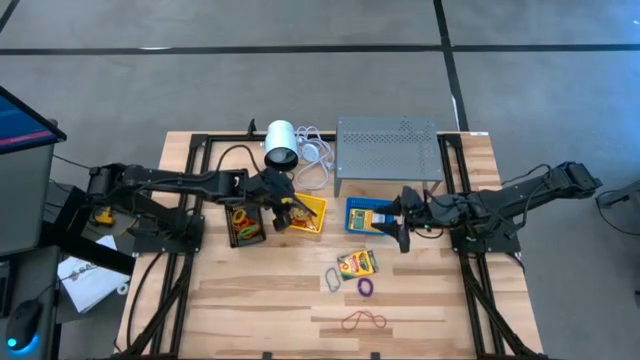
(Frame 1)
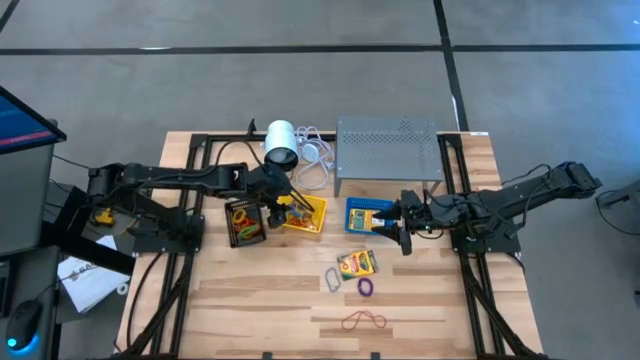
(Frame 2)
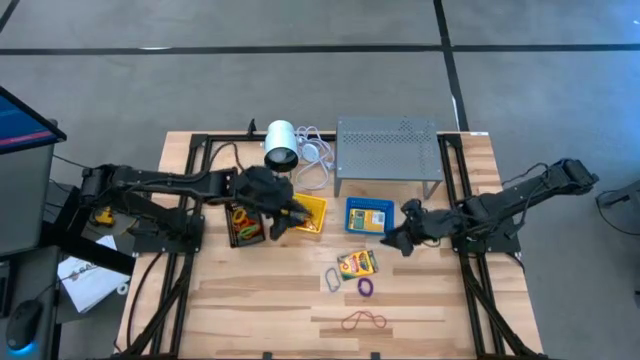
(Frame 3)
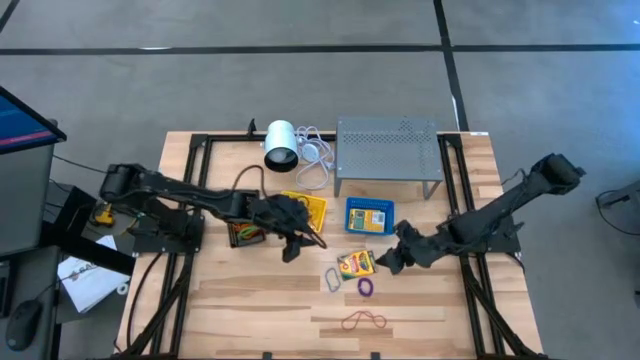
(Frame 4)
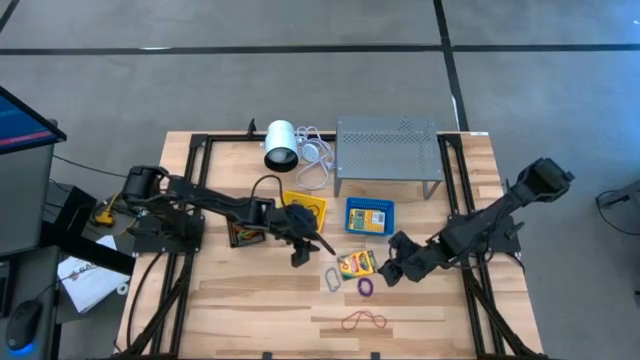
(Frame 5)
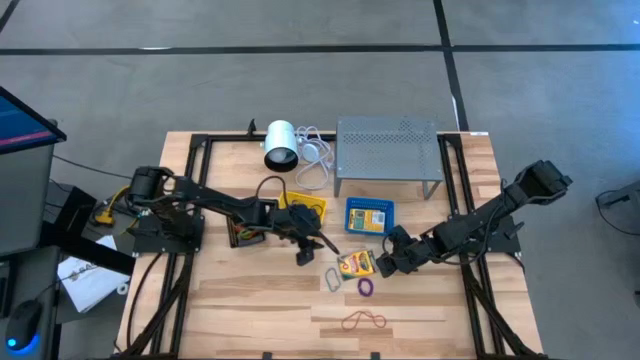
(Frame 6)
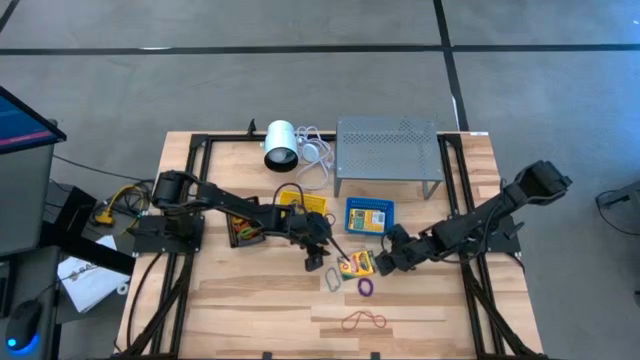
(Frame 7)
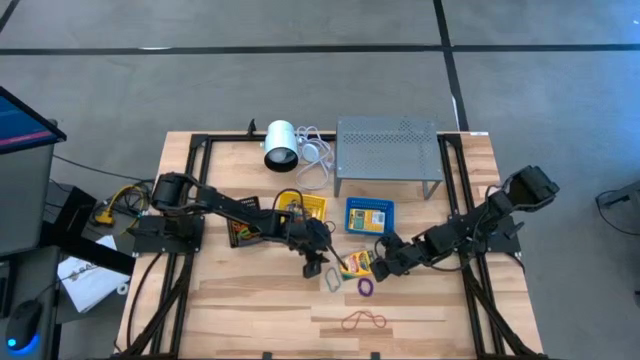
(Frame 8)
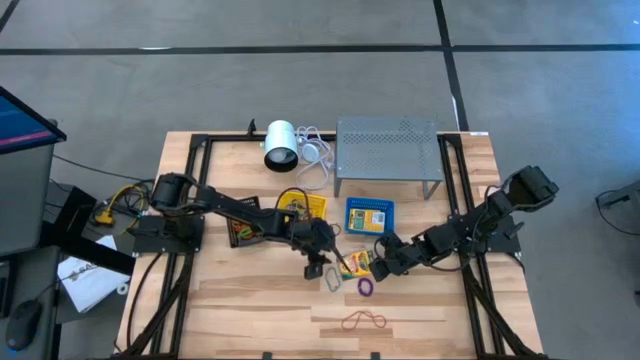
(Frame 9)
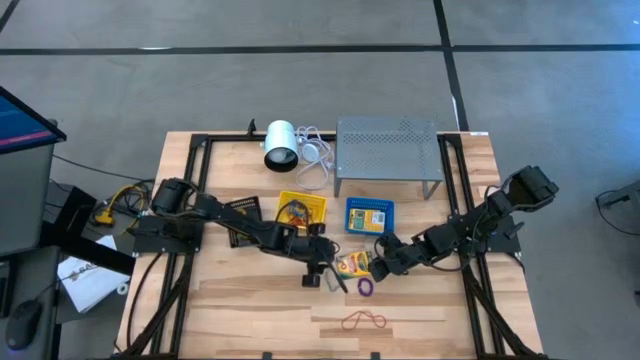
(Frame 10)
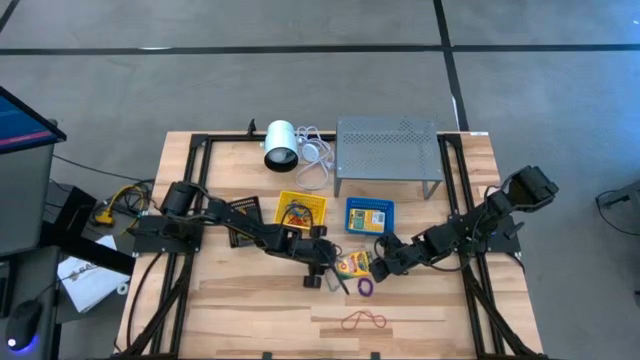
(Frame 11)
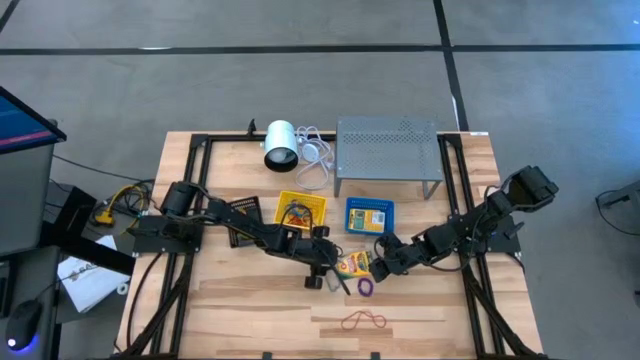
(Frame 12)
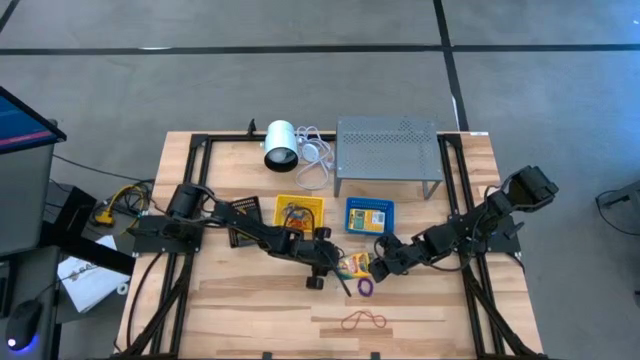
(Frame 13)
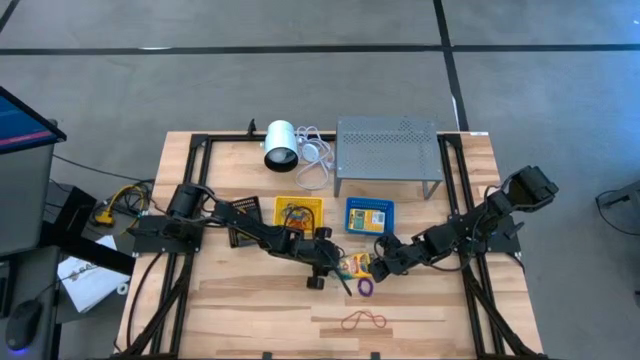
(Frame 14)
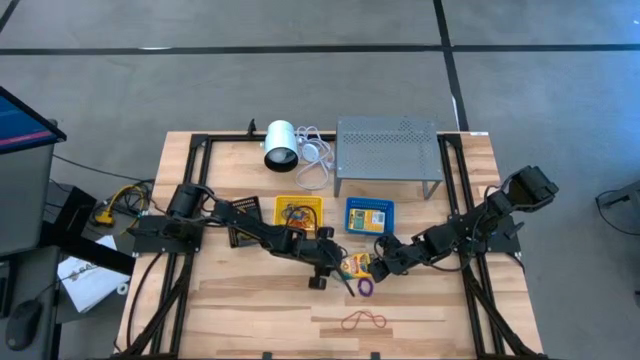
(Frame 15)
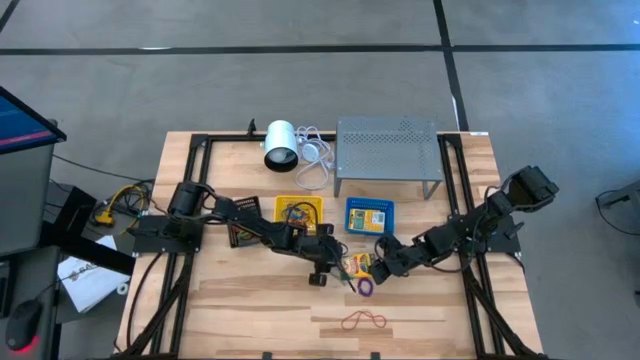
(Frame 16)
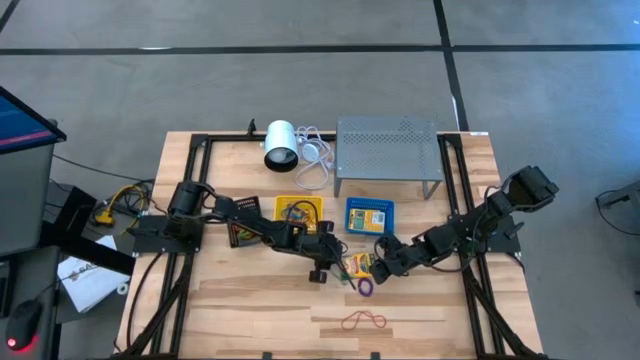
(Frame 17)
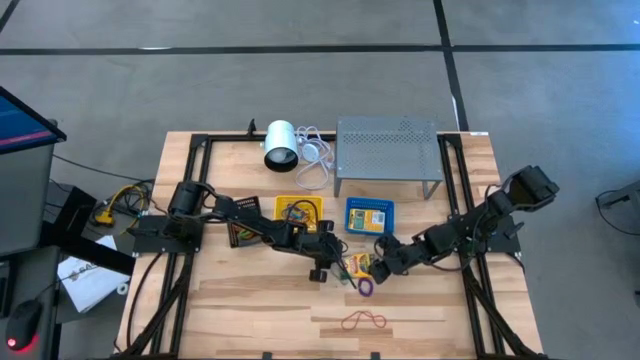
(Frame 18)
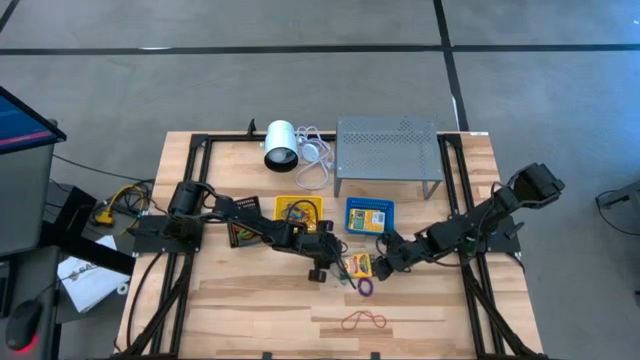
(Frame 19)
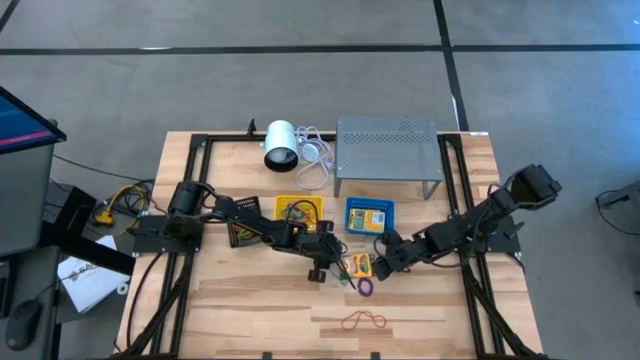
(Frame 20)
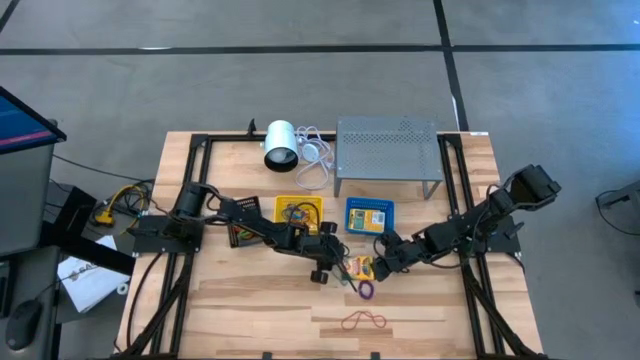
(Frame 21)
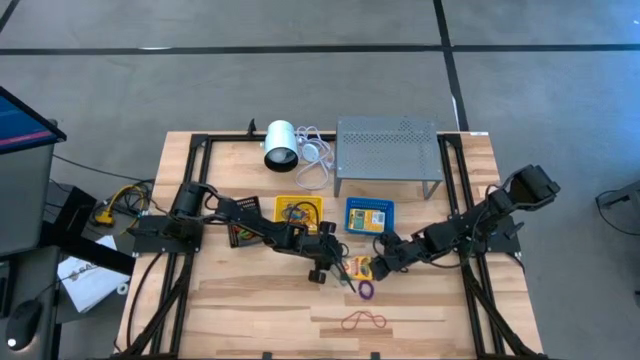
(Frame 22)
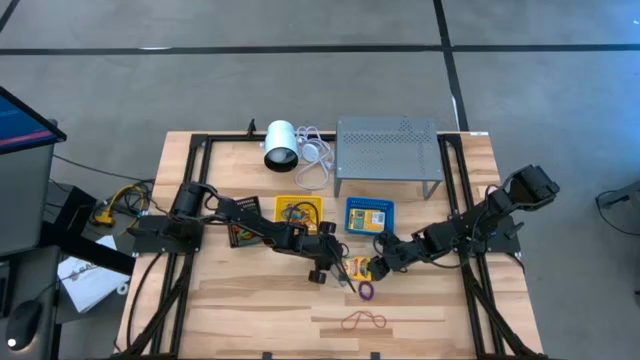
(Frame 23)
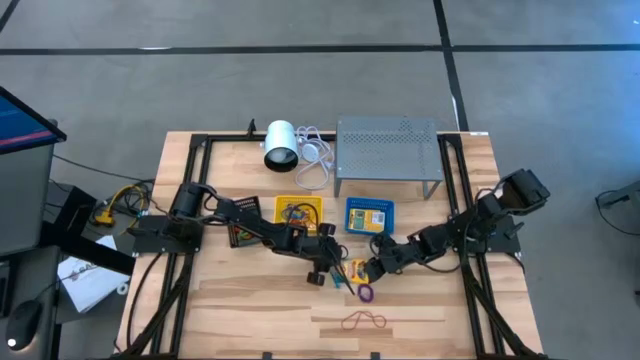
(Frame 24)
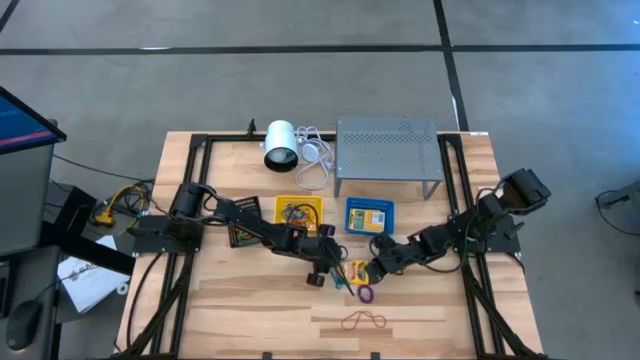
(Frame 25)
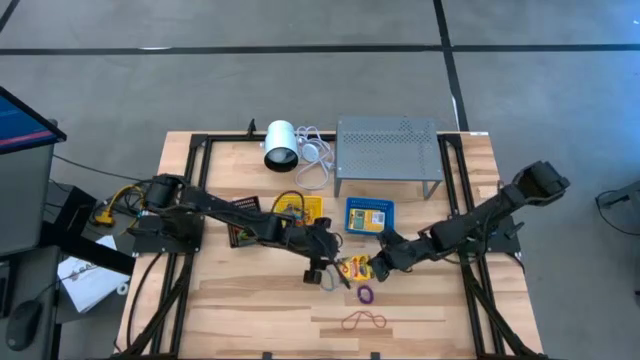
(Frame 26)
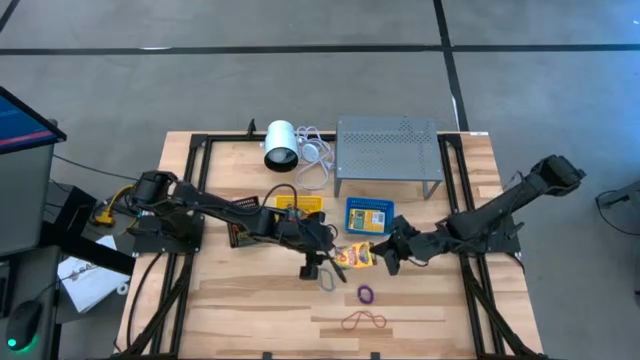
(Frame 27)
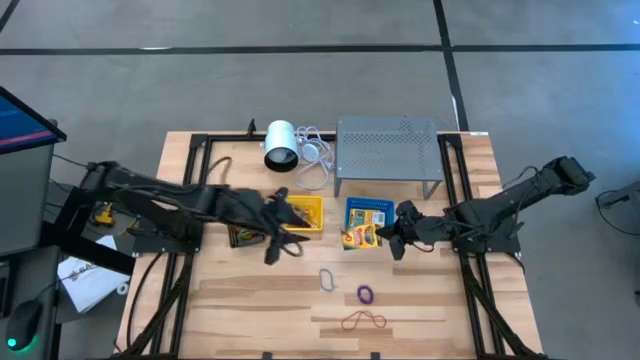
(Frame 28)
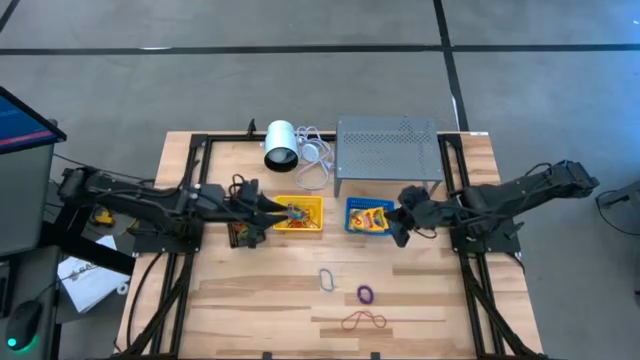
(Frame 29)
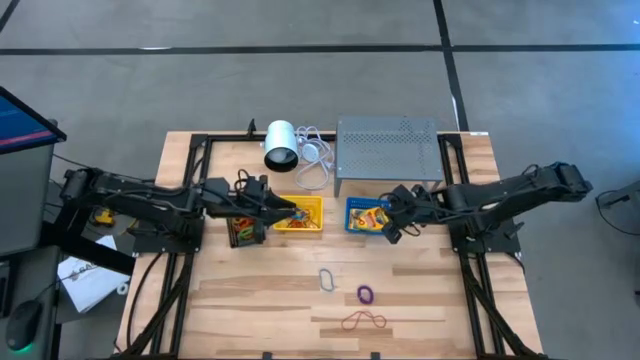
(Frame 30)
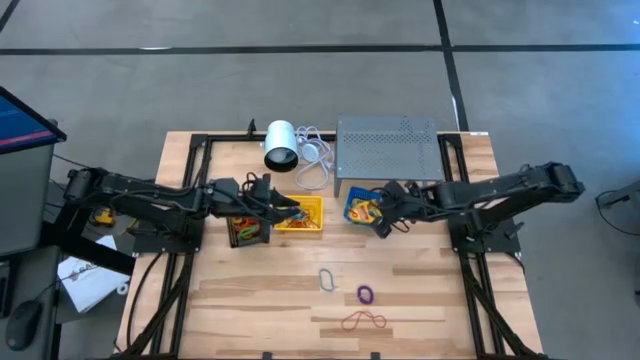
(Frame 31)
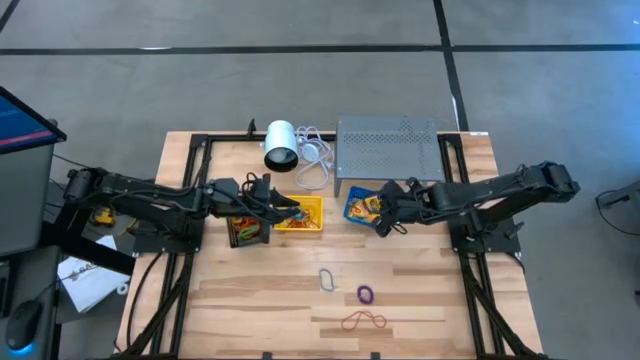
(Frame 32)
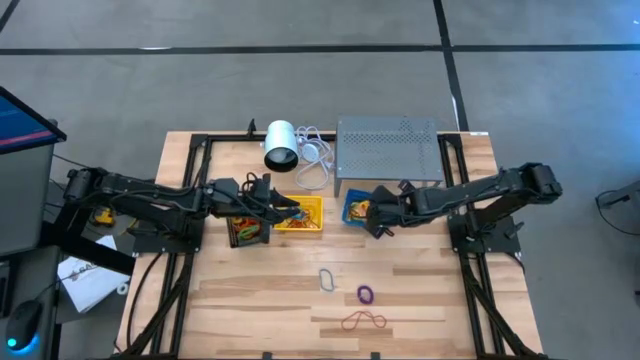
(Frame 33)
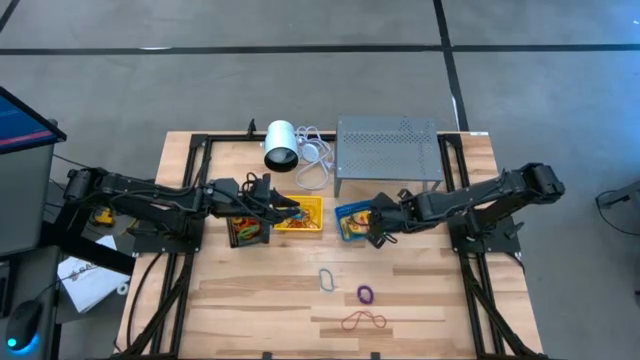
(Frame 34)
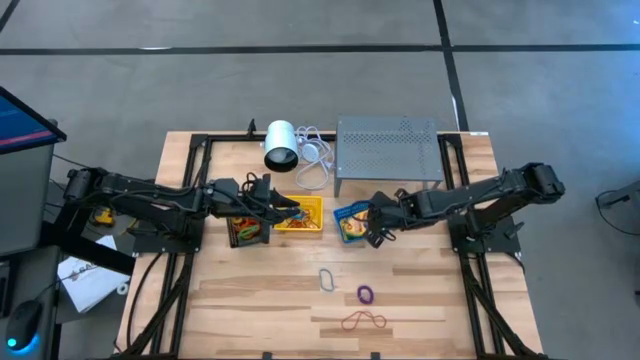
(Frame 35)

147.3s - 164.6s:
Task: Pick & Place Office Desk Supplies
Put the crayon box into the blue bin

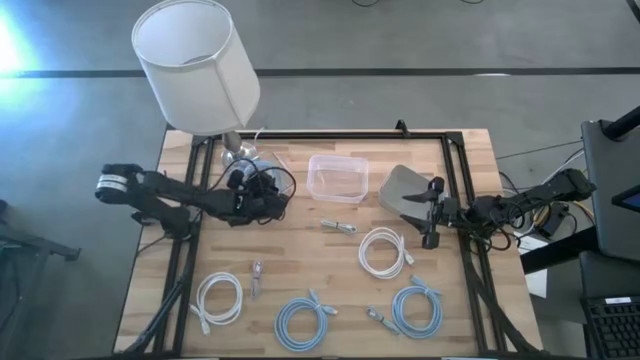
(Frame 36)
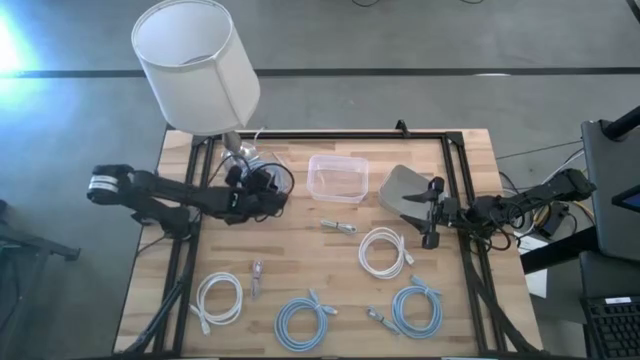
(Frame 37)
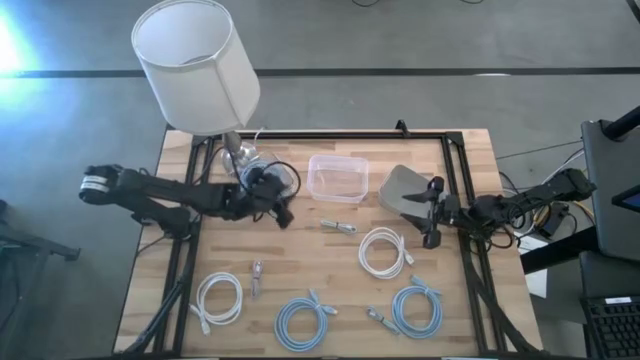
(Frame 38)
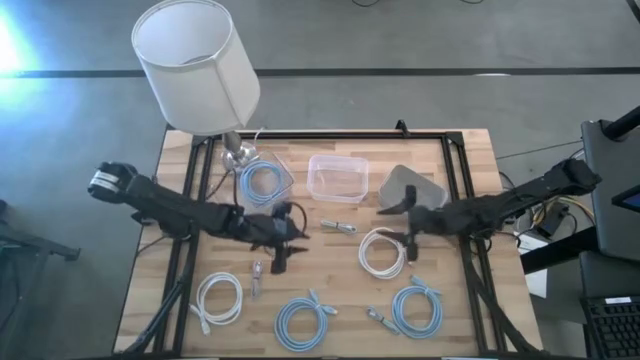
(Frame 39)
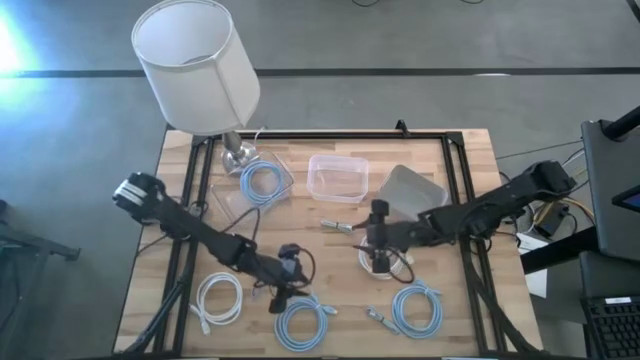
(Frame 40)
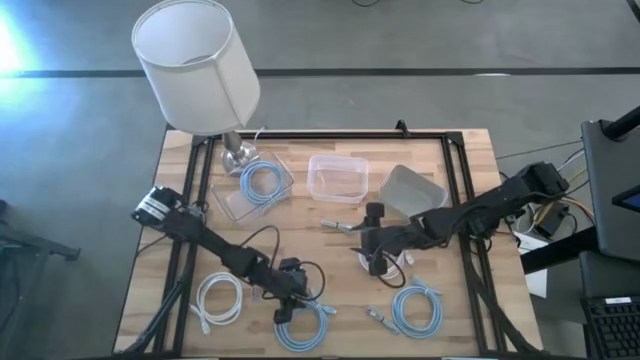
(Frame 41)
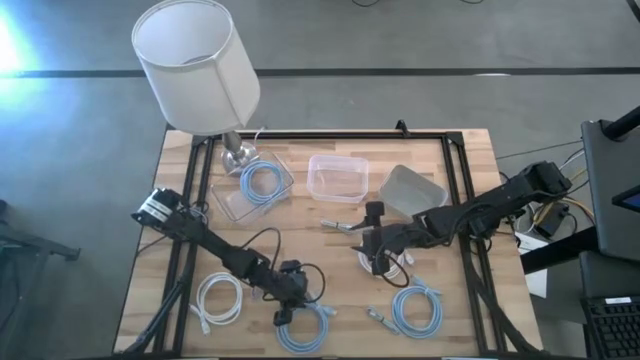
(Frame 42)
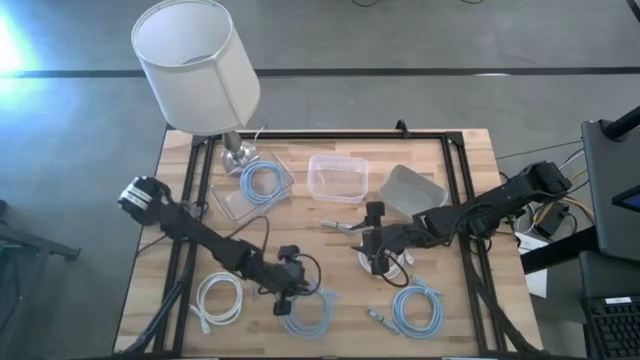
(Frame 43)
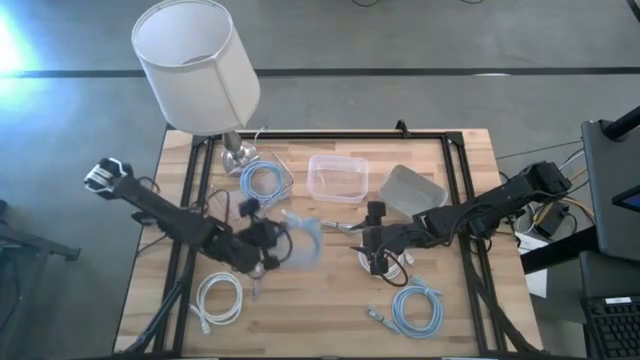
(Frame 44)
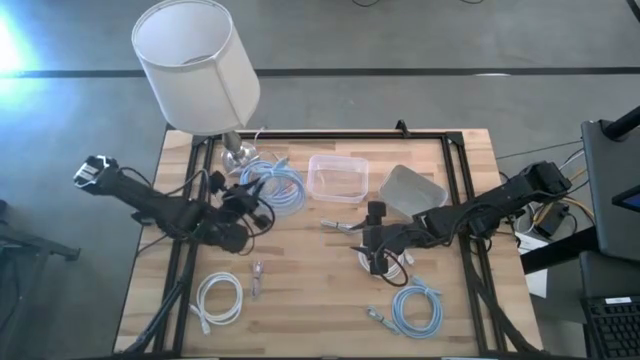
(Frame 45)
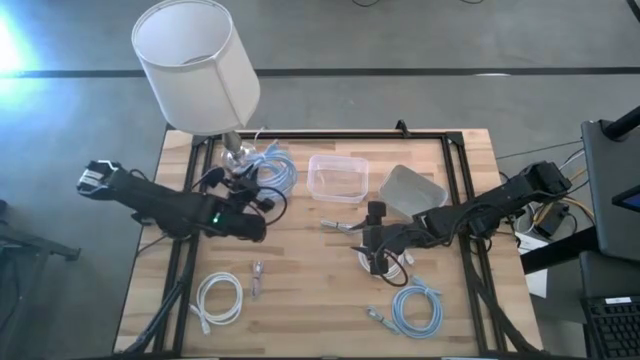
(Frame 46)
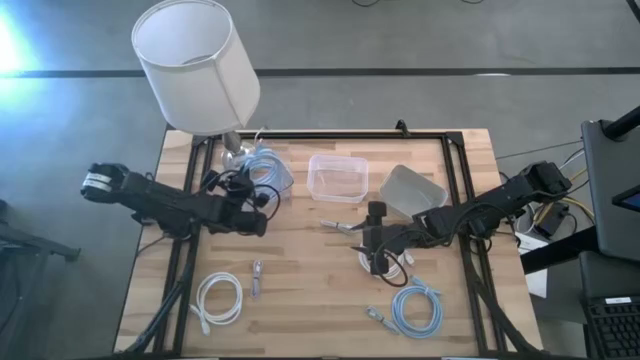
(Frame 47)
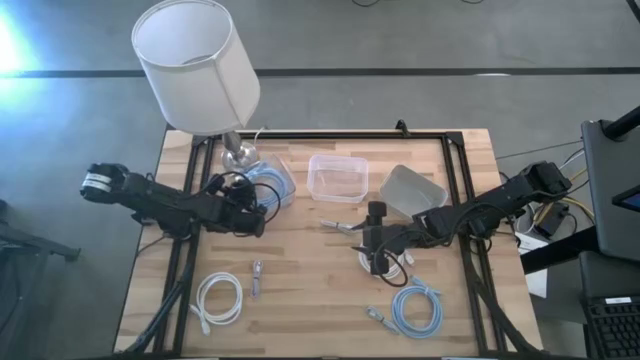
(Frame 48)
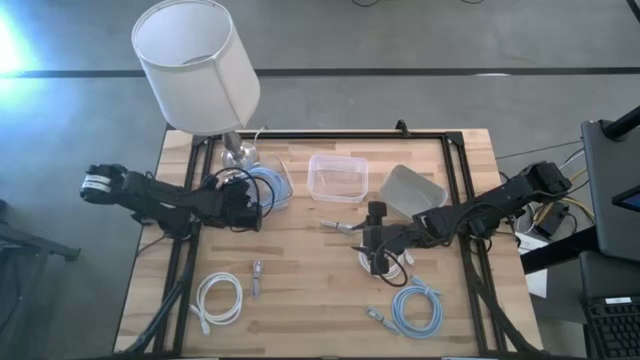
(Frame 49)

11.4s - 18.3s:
Task: Pick & Place USB Port
Put the left blue HDMI cable into the left transparent bin
